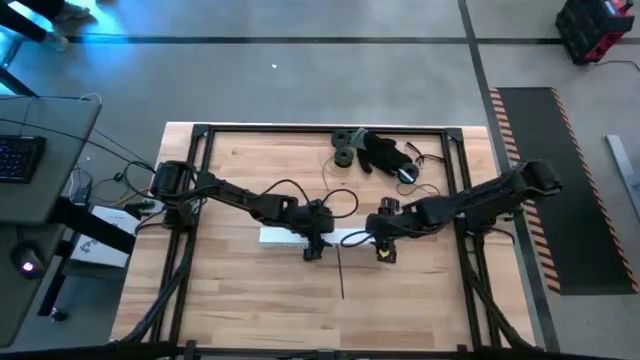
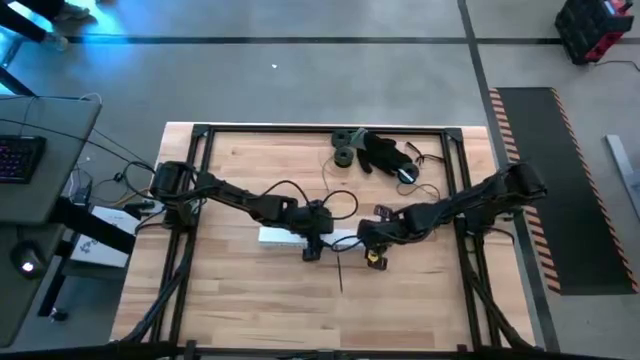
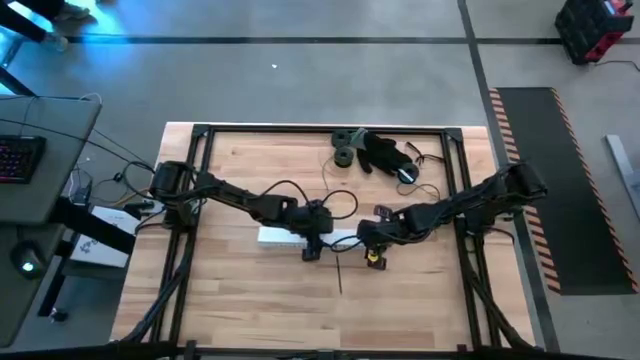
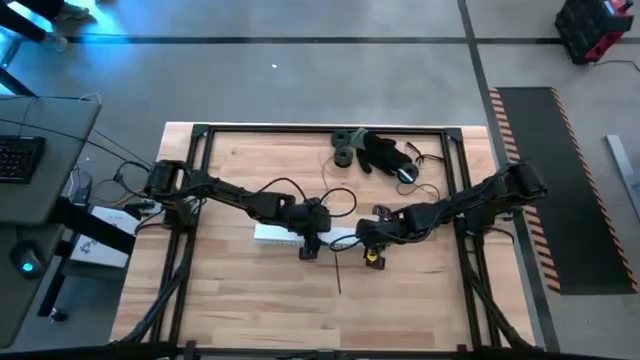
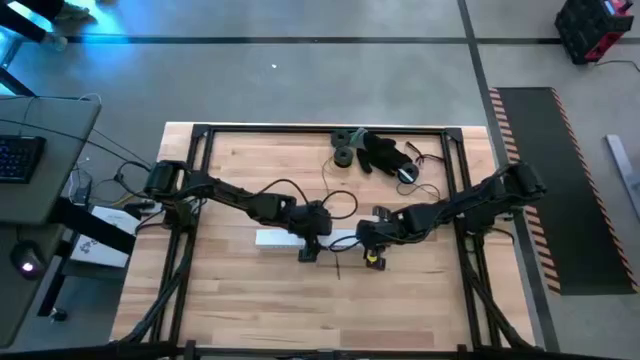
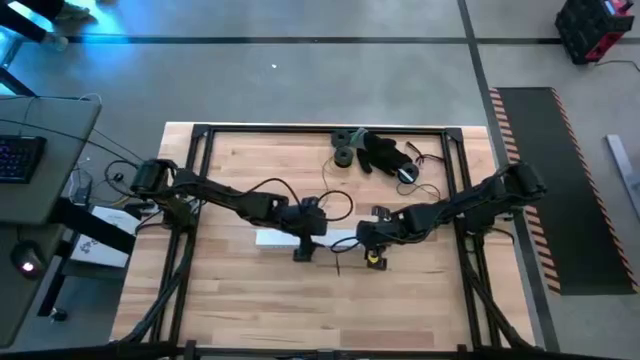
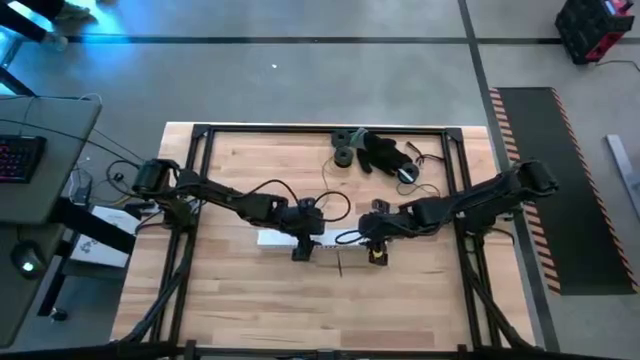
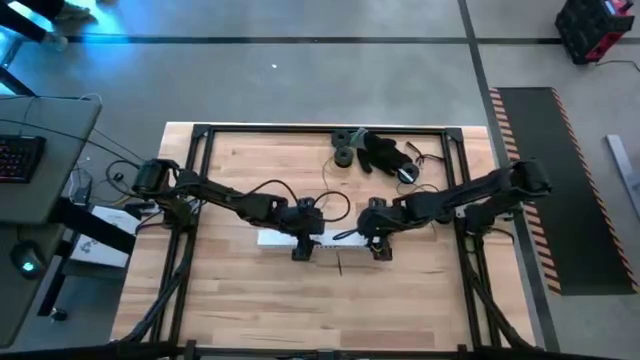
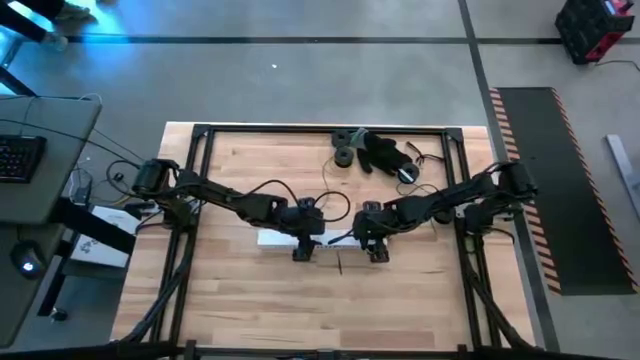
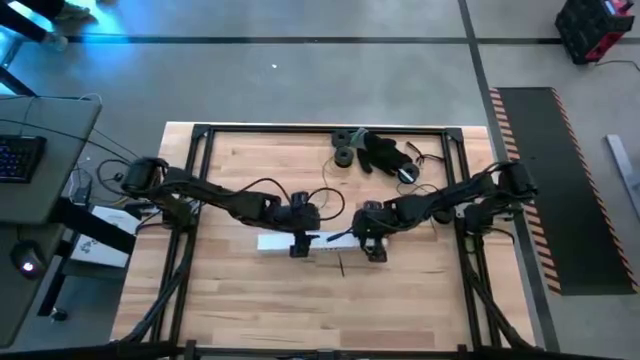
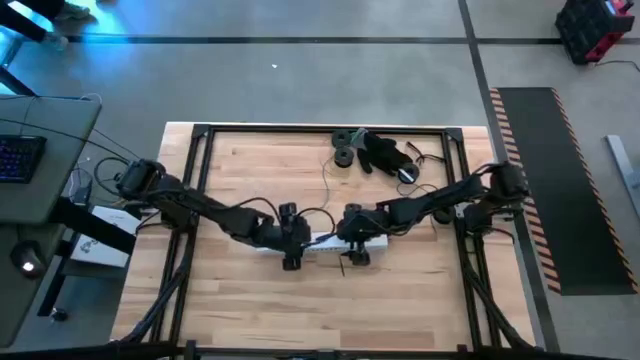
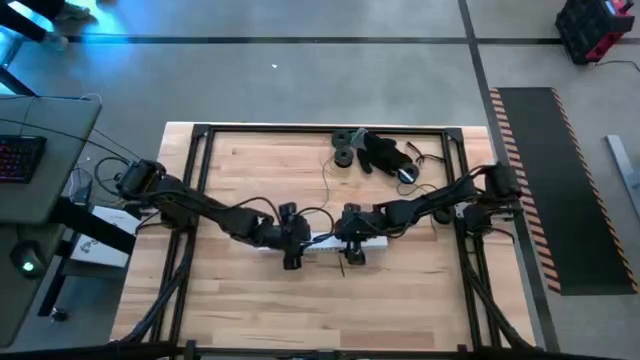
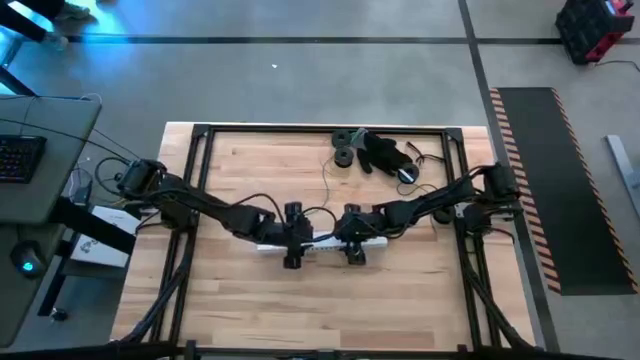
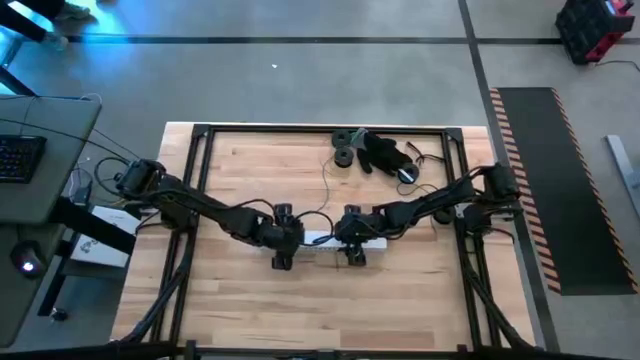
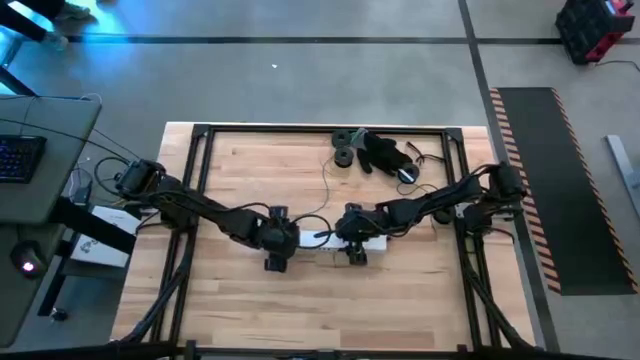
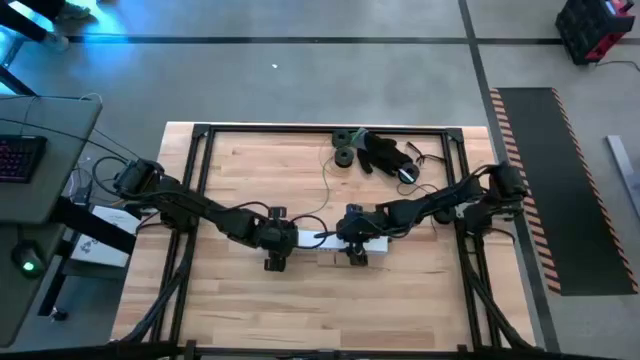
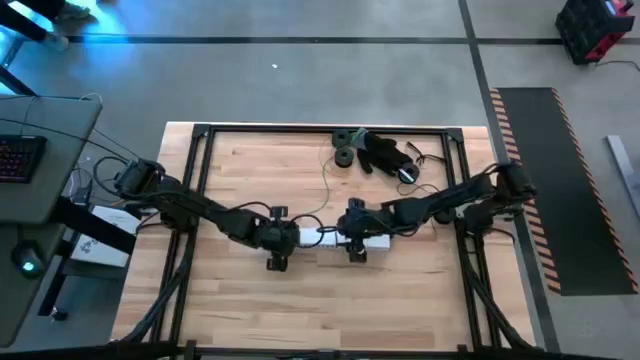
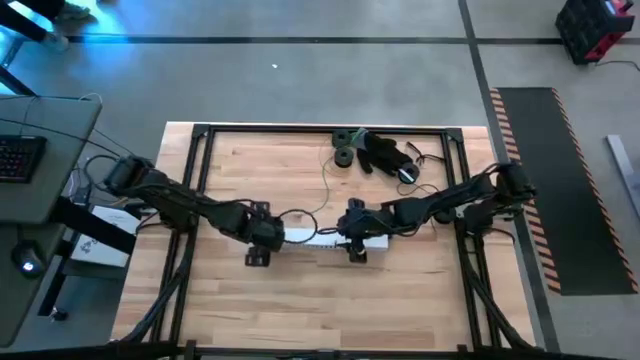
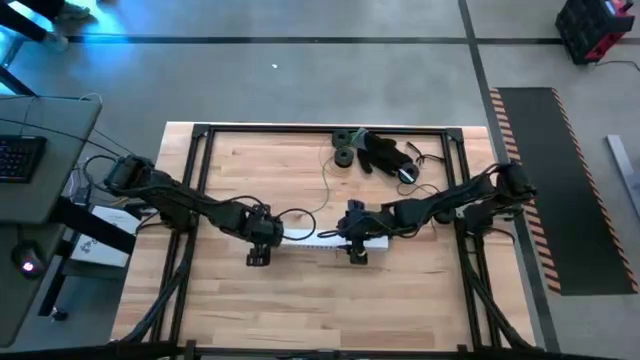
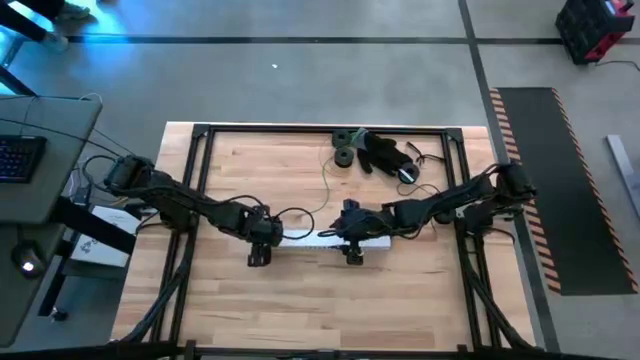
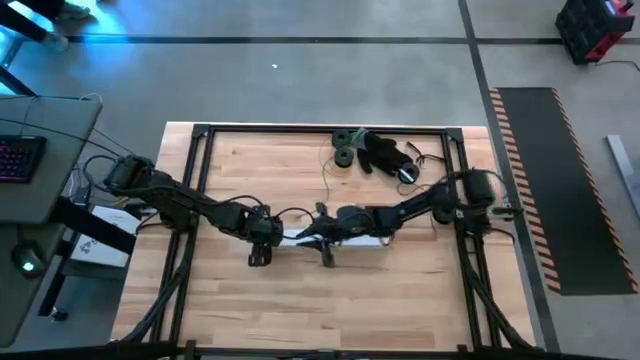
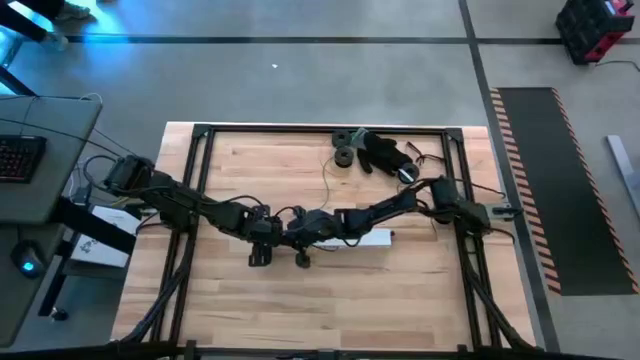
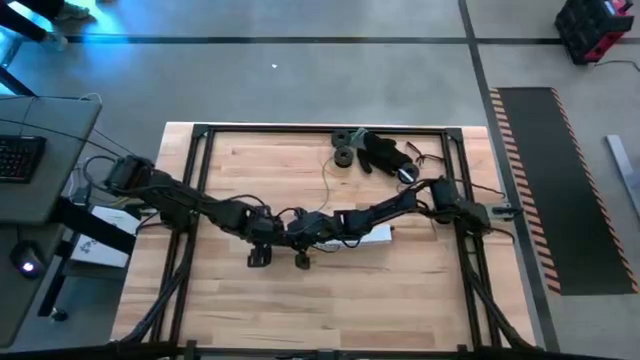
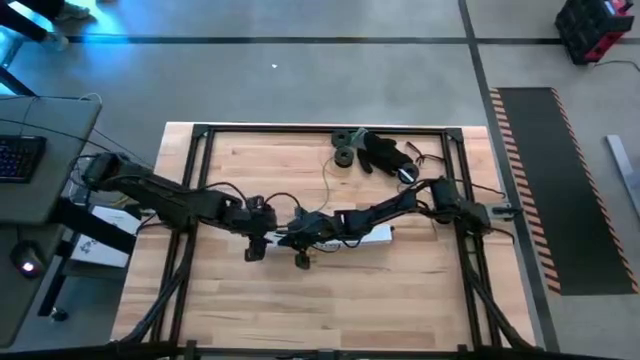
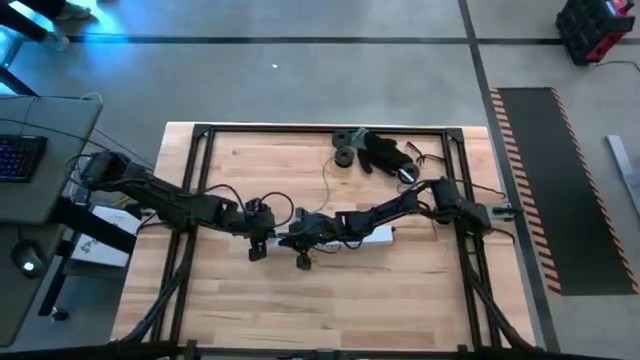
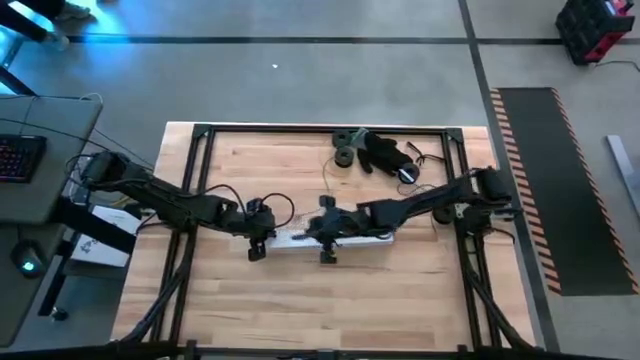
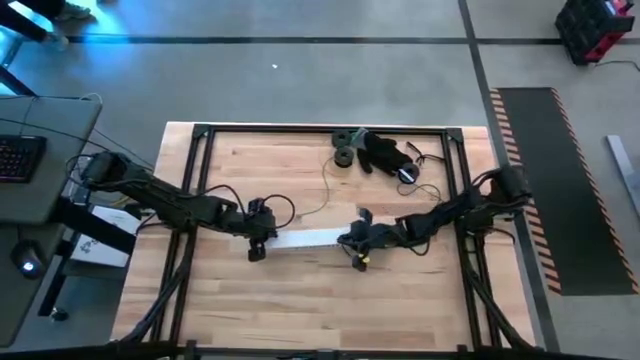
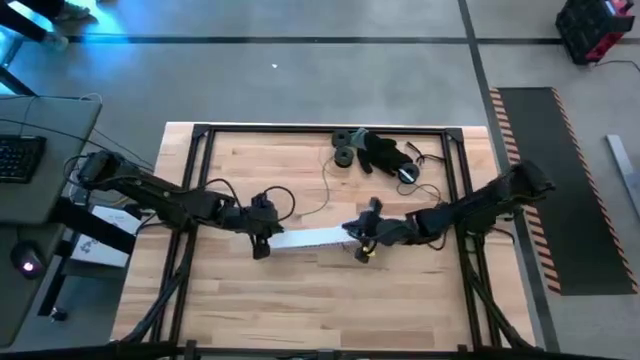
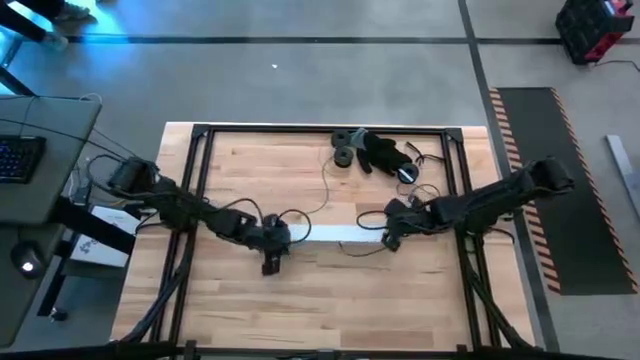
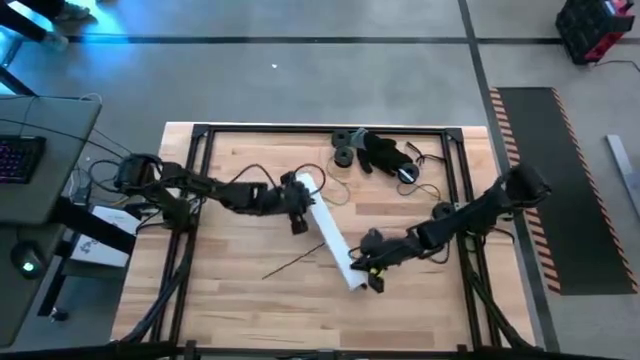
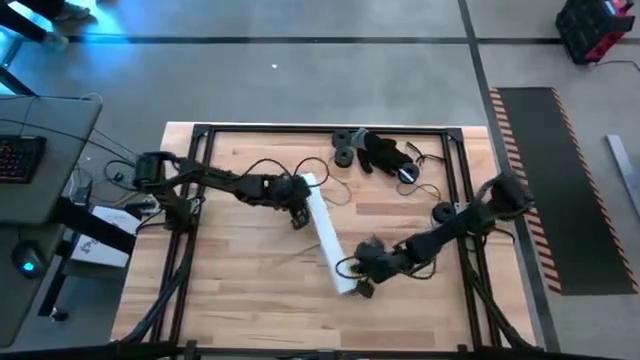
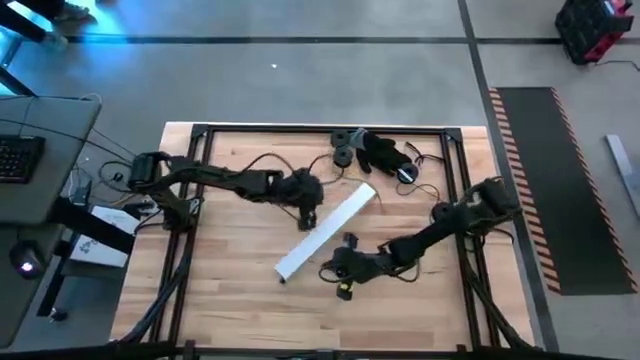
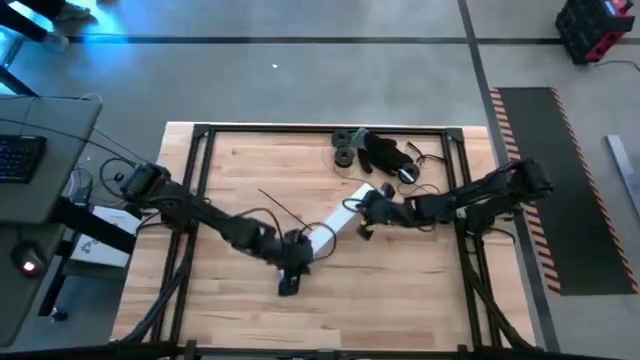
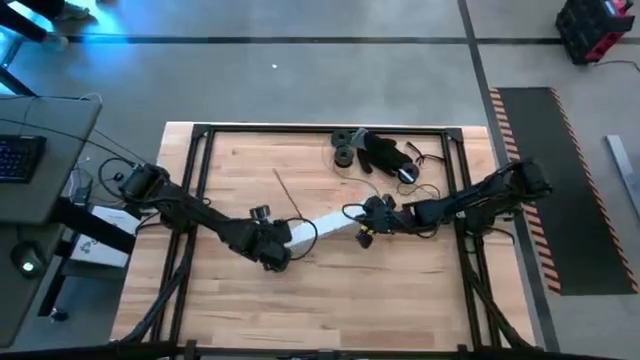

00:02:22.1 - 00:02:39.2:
Task: Ziptie cables
Close the white cable duct

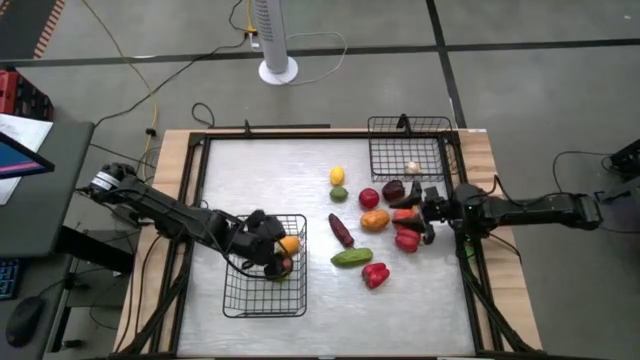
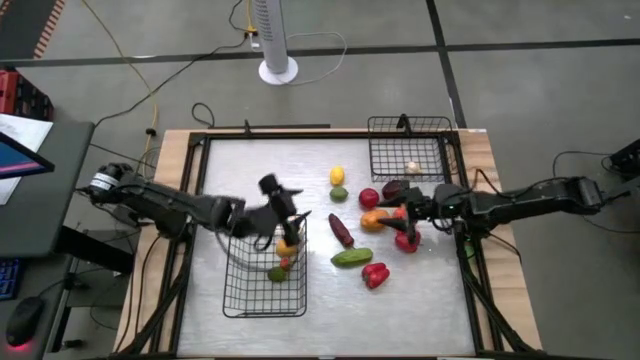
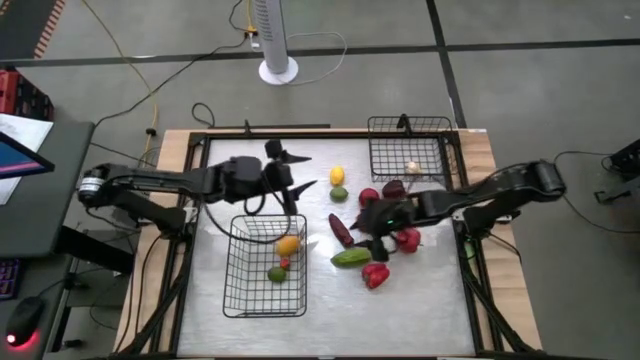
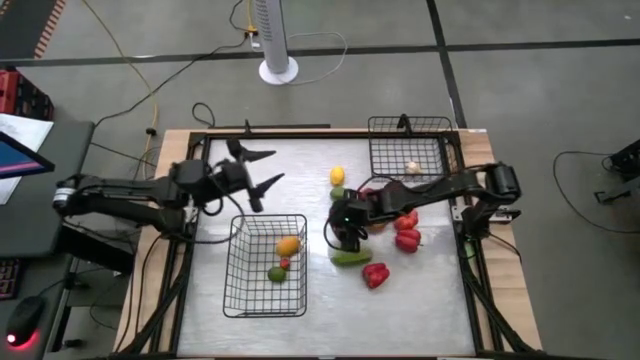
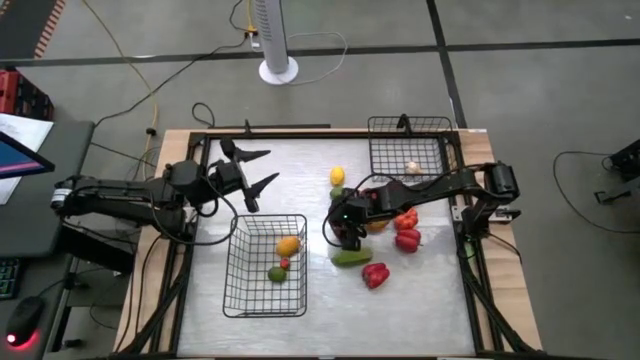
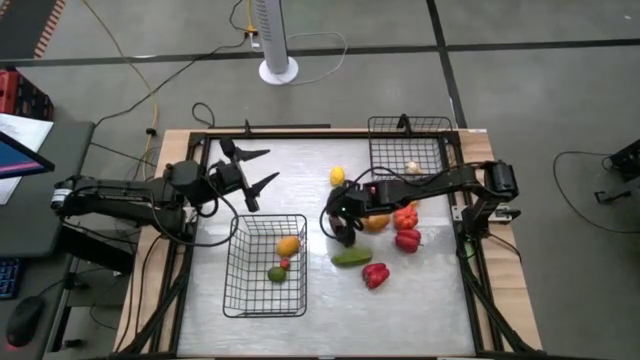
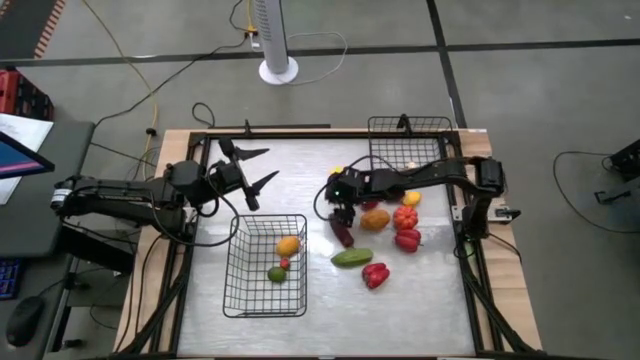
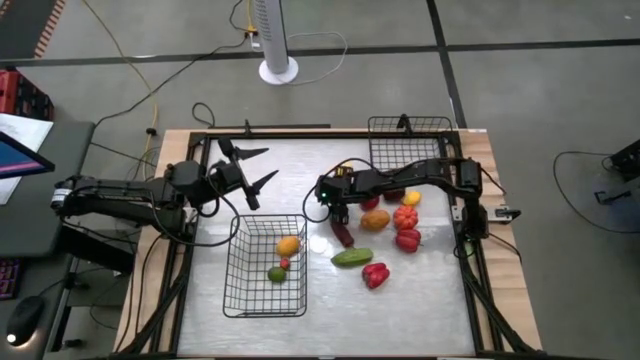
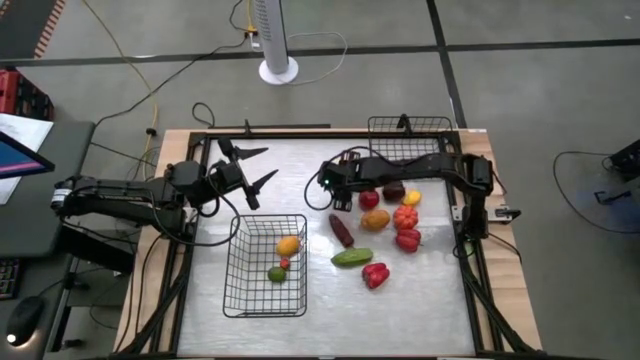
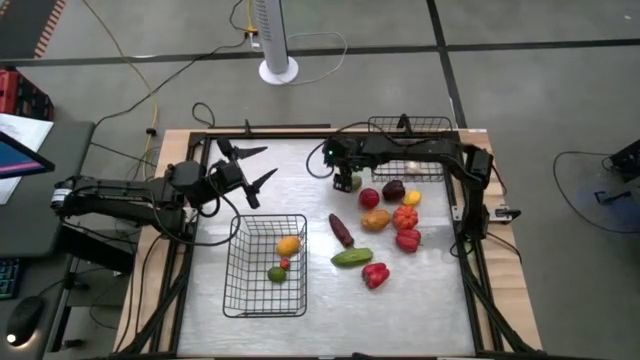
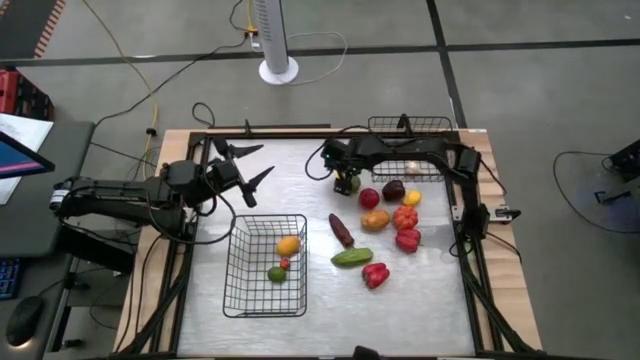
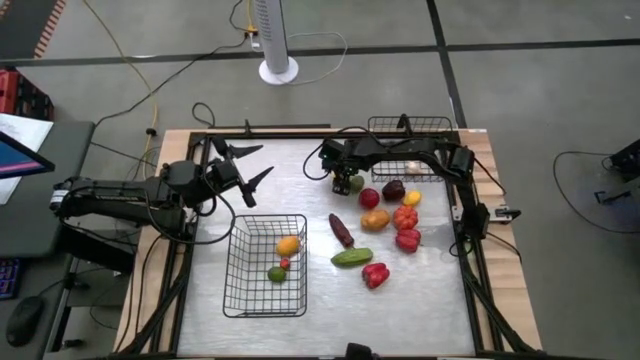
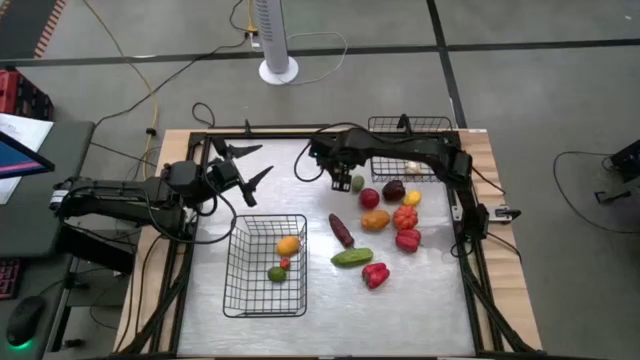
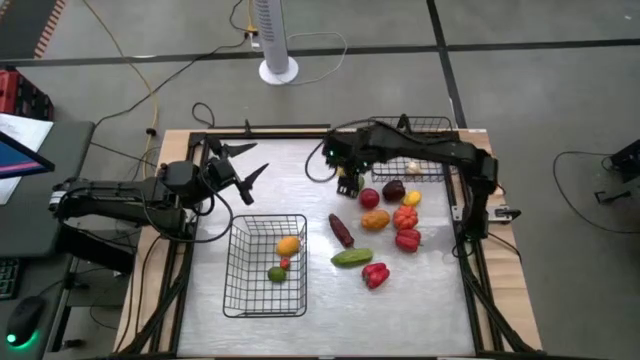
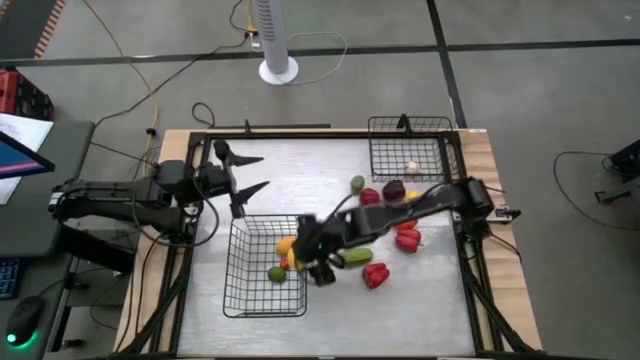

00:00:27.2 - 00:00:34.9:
Task: Sort produce into baskets
Put the lemon into the bottom wire basket
